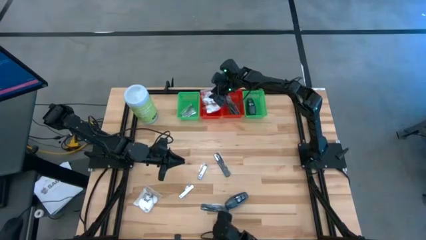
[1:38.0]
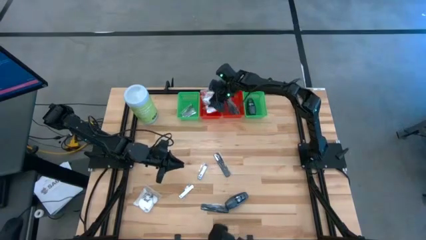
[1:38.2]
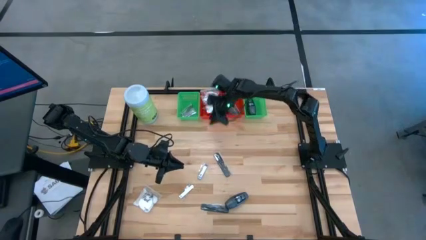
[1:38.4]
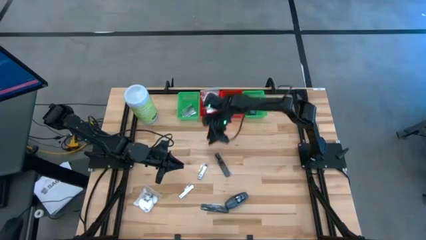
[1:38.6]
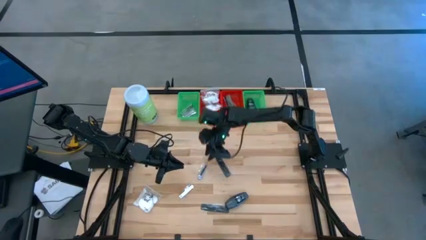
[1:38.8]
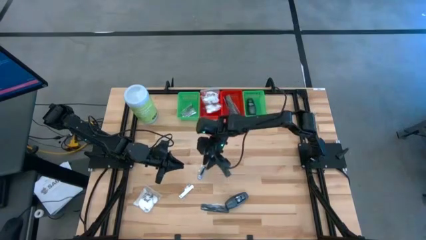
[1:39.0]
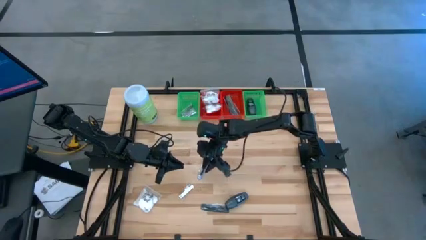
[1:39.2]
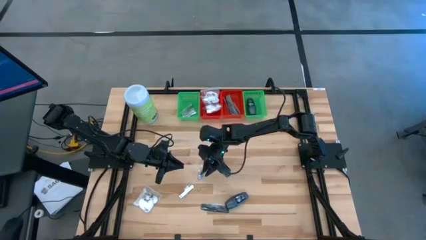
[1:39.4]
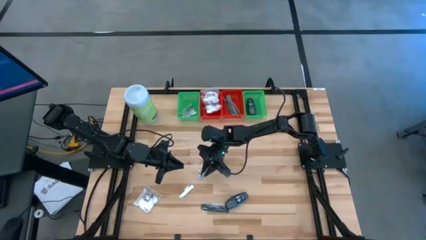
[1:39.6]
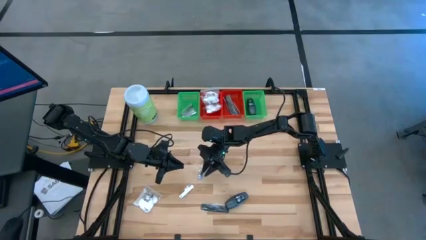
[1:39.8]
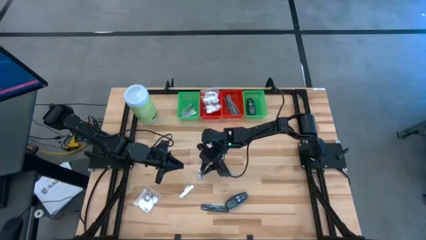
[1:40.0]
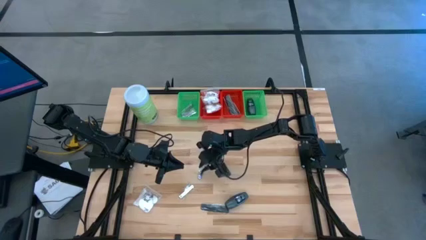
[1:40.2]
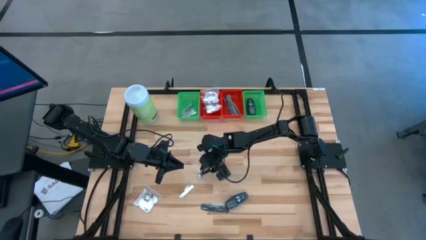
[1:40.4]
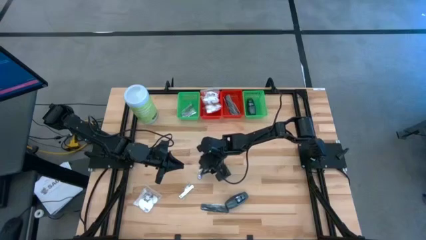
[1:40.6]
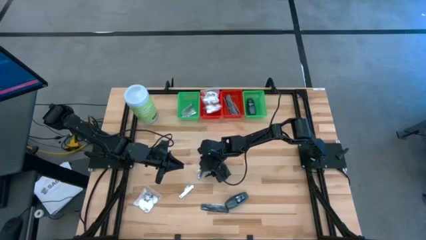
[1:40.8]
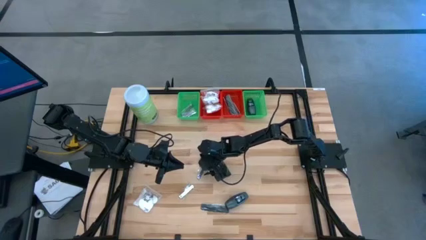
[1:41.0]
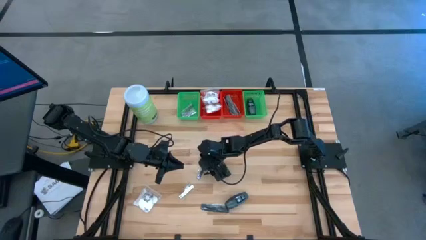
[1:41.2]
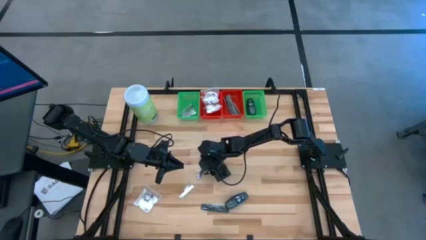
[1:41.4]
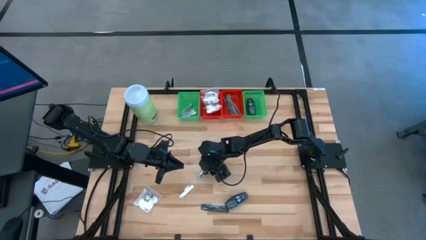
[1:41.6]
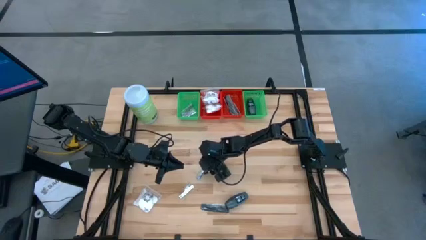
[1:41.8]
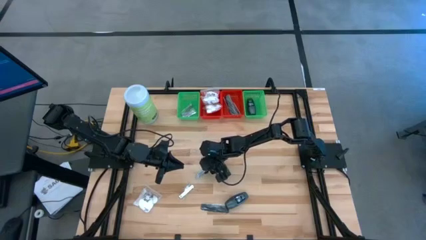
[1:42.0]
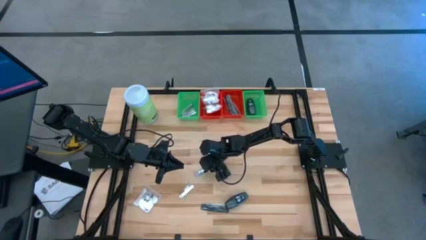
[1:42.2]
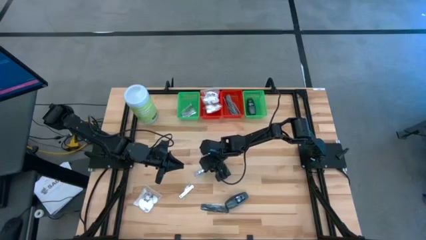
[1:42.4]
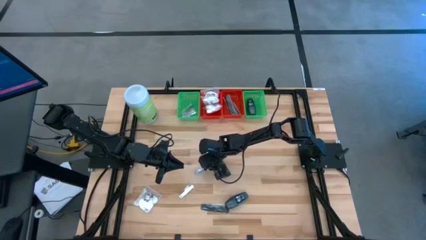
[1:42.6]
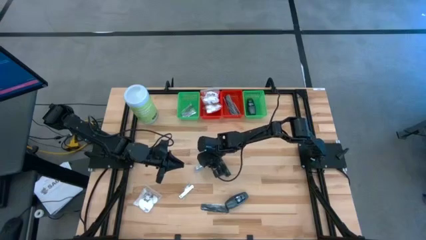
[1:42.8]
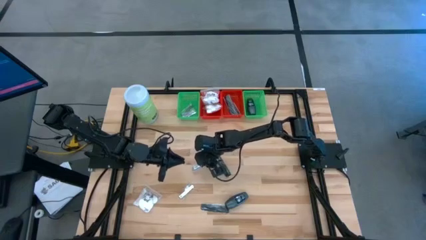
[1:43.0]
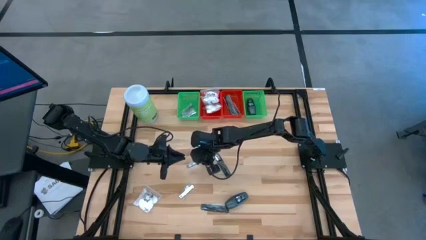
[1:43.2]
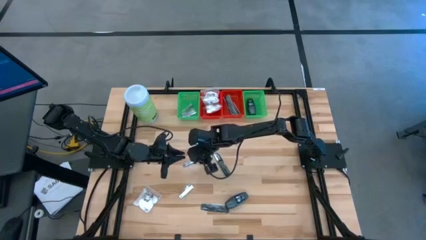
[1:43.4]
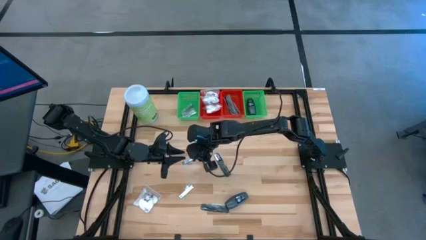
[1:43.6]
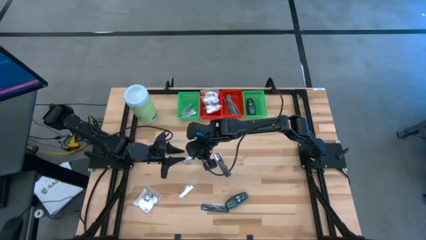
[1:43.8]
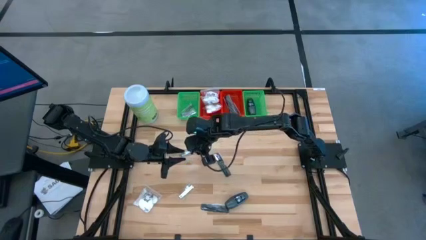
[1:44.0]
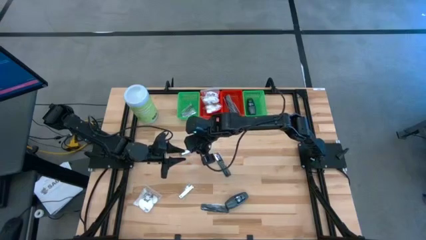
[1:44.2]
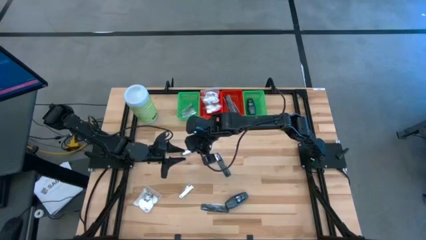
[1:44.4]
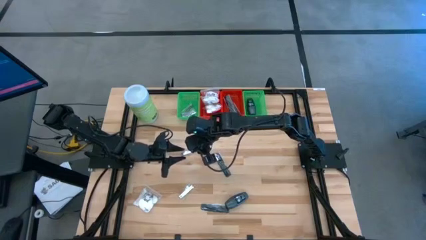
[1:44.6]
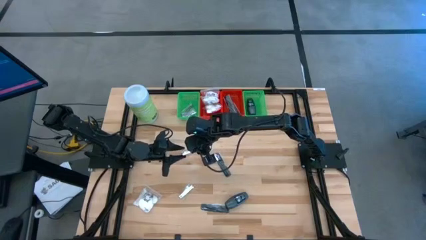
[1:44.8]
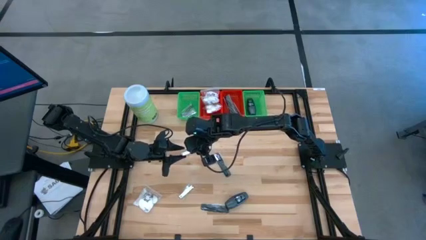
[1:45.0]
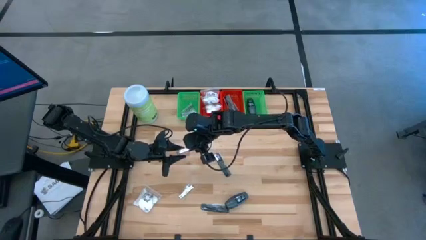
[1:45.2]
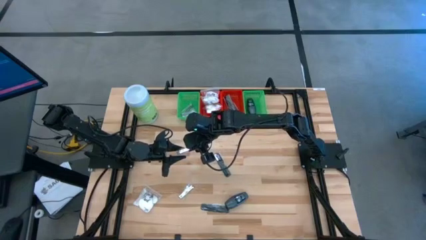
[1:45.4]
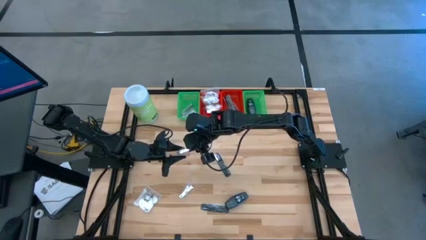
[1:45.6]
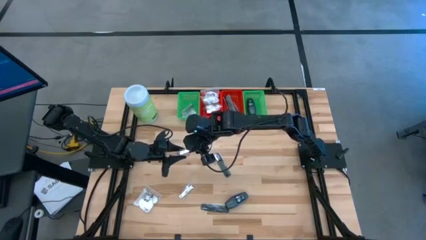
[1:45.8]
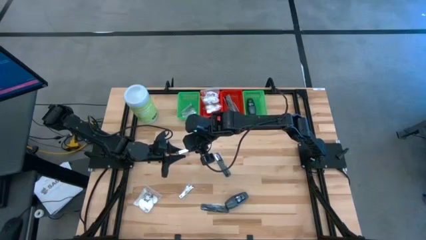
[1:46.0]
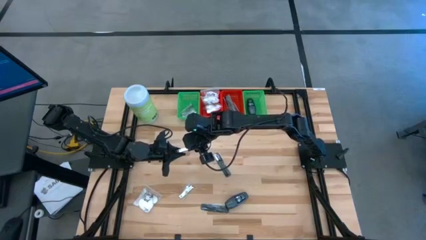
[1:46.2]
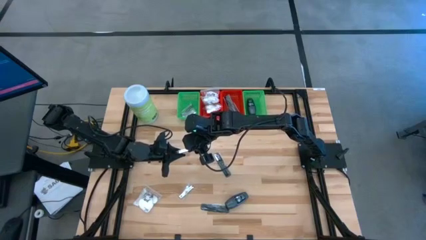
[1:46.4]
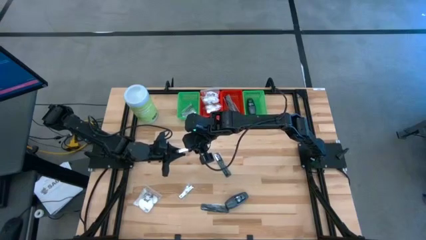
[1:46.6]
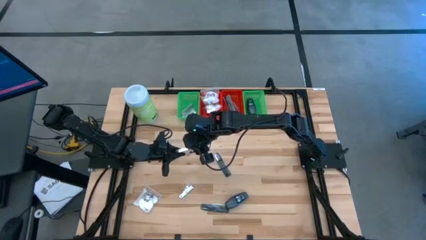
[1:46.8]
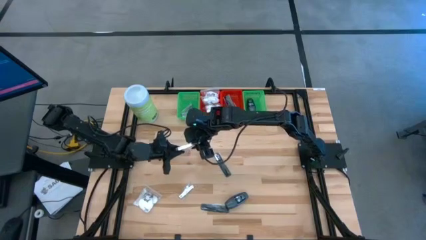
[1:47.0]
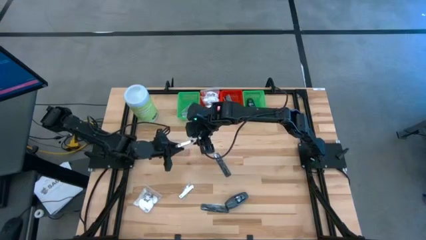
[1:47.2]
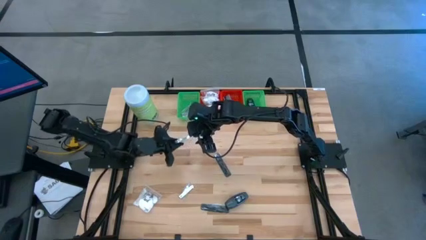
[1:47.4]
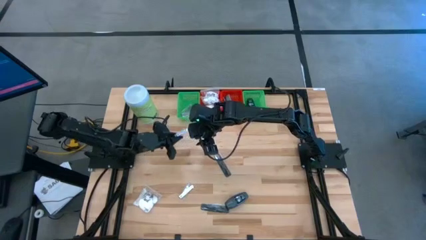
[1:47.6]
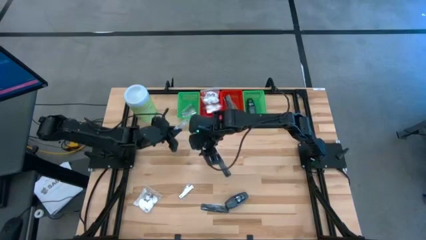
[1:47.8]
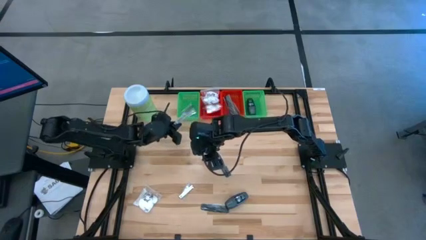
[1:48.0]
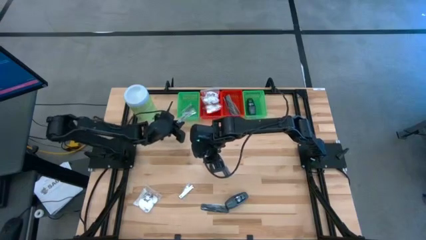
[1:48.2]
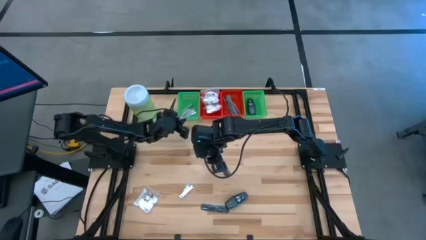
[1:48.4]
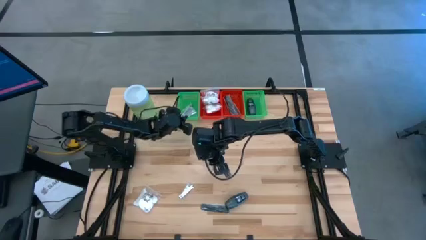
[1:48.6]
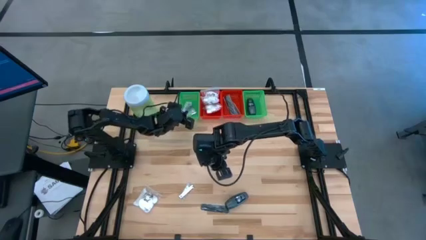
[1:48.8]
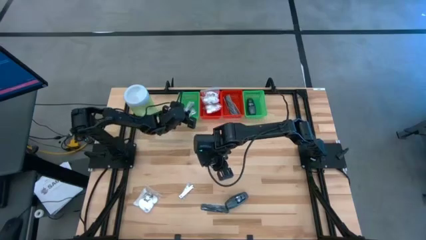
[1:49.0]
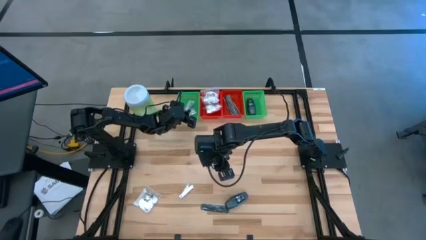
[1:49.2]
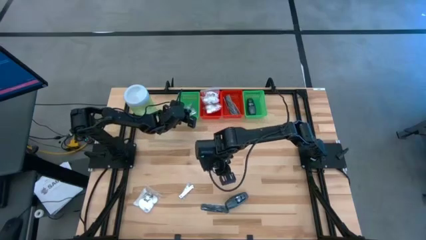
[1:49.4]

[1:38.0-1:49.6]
Task: Pick & Place Travel size toiletries
Put the silver nail cutter into the left green bin

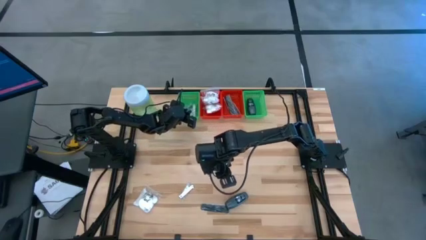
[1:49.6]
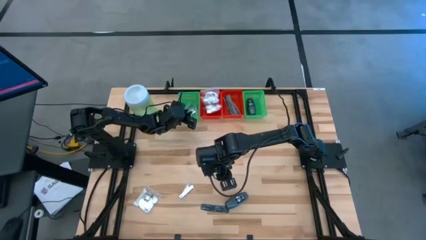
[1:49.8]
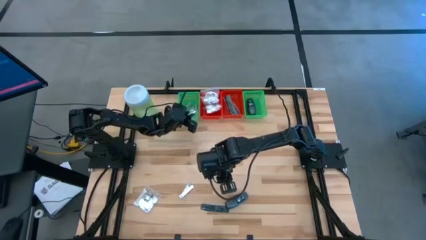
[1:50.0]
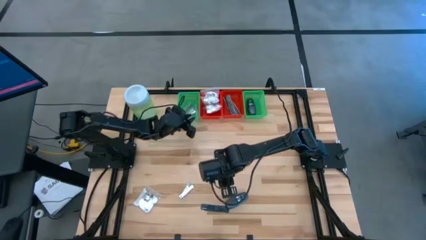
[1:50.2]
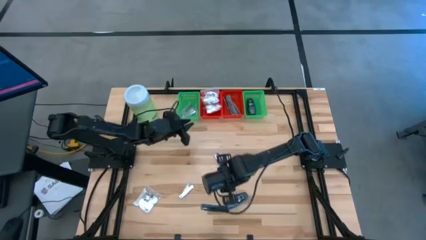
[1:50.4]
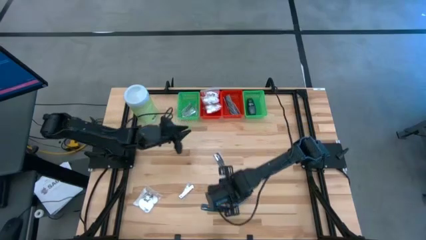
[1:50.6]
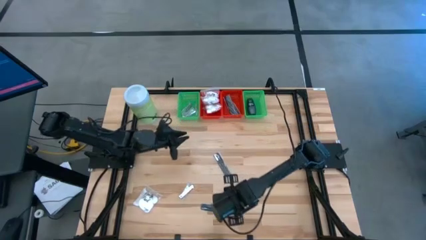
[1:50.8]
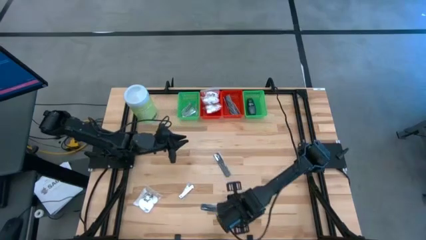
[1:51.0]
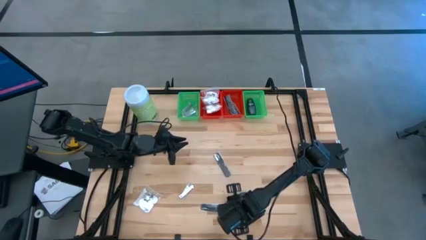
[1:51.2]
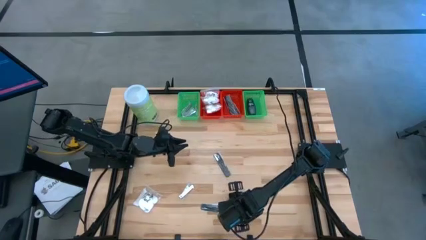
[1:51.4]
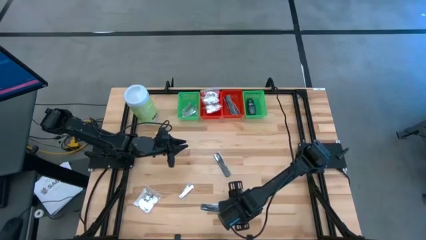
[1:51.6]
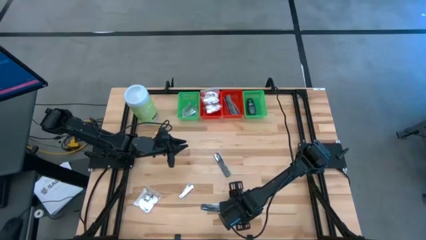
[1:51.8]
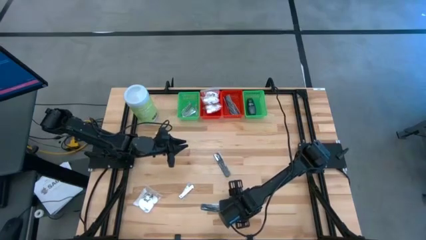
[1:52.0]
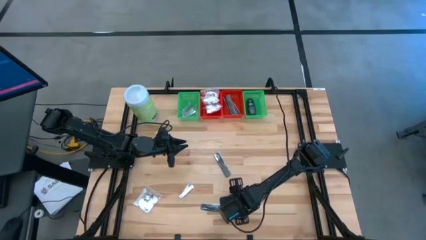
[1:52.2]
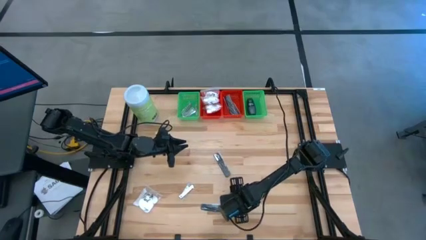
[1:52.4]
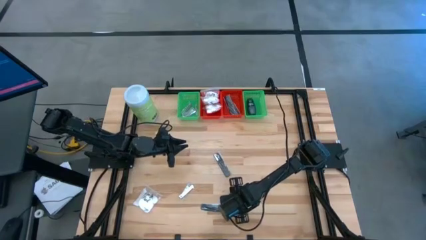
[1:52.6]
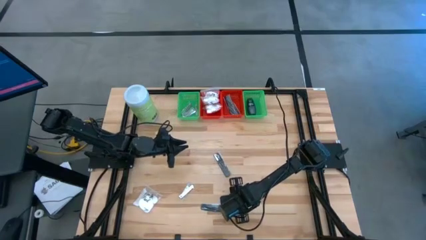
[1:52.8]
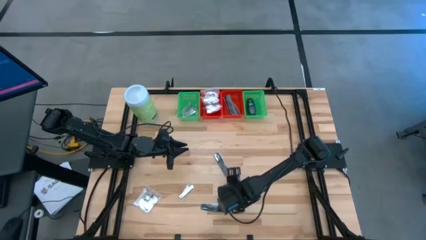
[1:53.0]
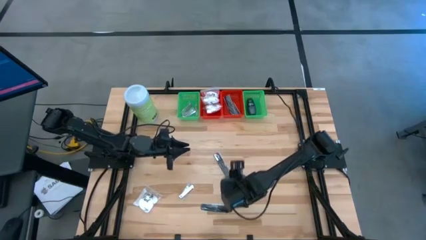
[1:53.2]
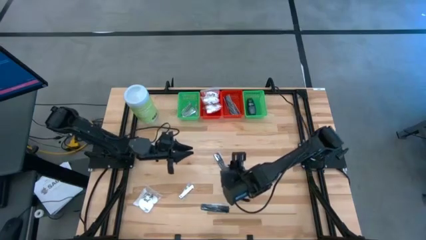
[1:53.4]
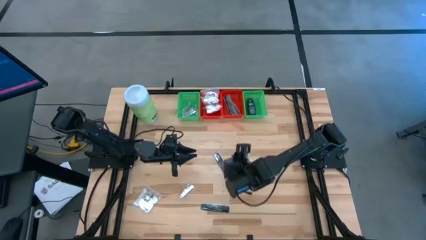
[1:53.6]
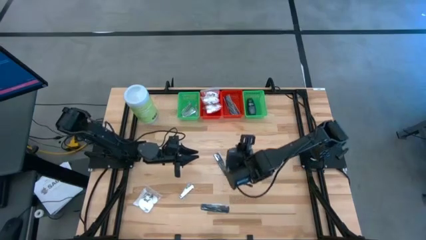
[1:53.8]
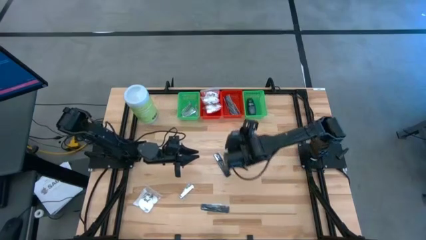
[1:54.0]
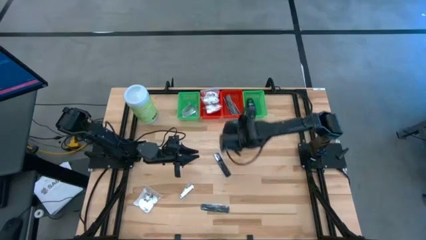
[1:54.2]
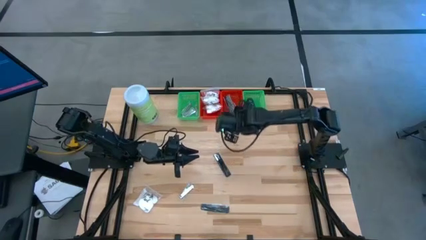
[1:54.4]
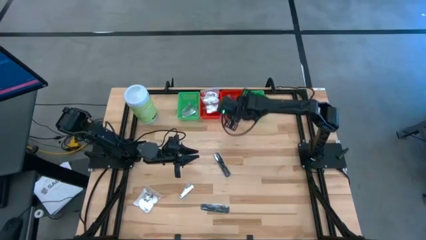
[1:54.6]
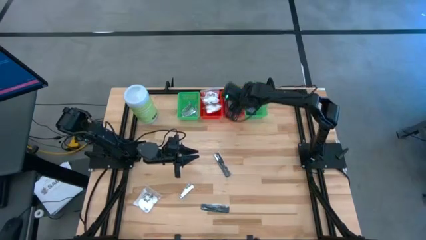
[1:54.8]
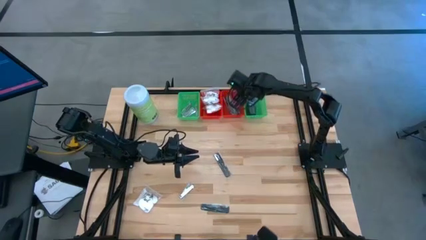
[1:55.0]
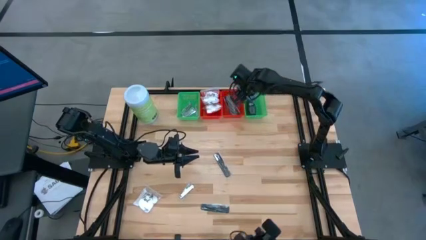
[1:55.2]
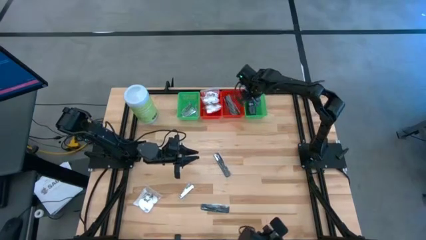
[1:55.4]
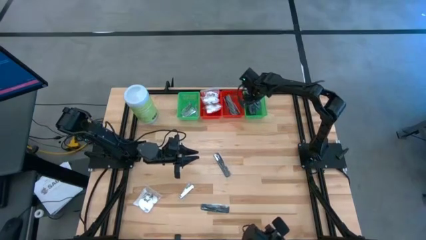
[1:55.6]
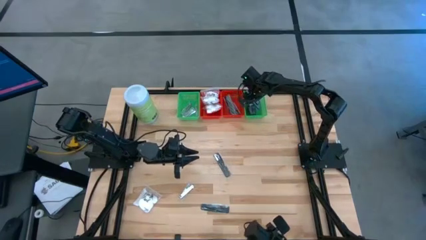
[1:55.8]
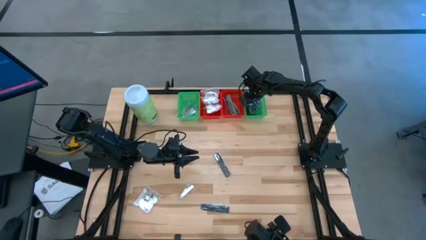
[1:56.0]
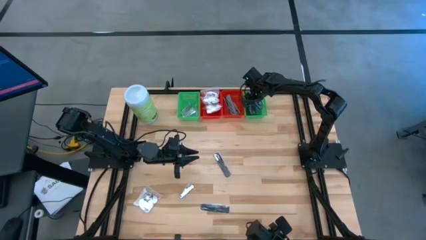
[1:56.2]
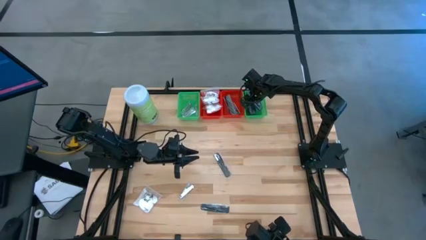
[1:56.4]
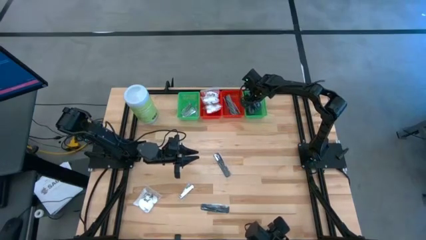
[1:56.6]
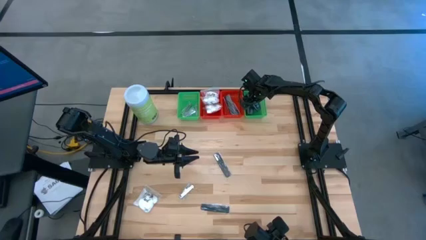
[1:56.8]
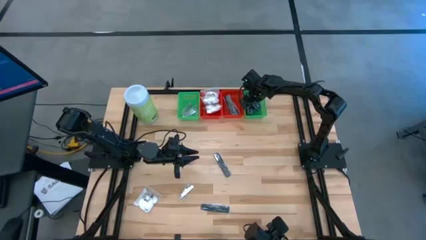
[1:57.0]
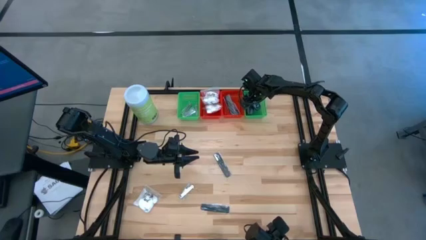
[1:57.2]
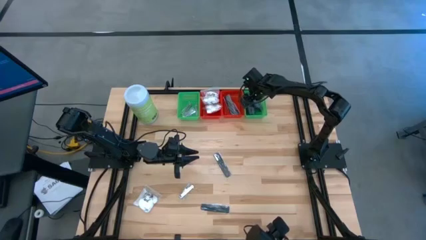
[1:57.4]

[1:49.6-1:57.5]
Put the black deodorant into the right green bin
